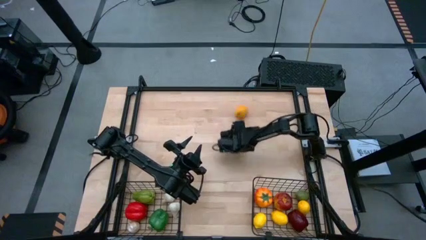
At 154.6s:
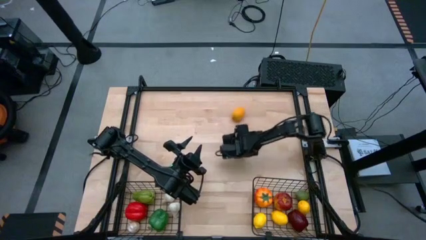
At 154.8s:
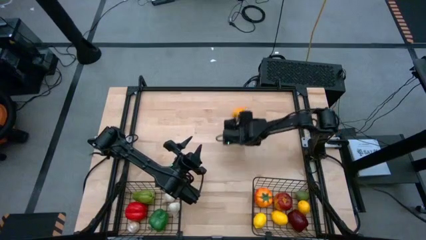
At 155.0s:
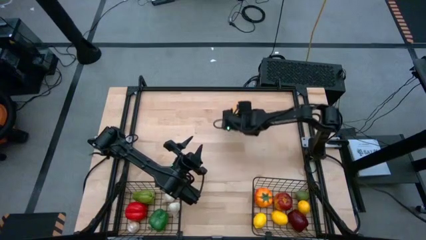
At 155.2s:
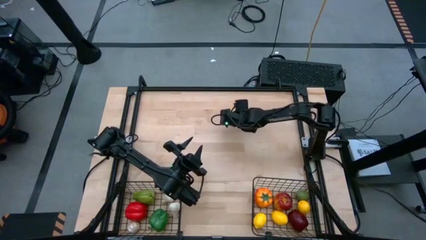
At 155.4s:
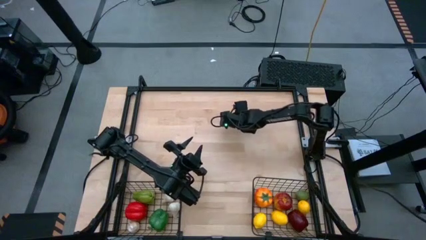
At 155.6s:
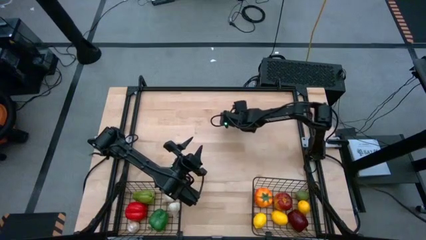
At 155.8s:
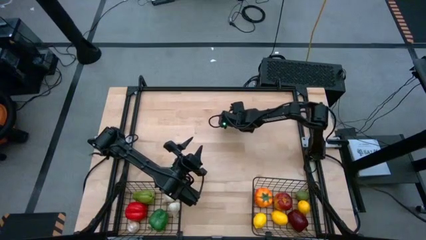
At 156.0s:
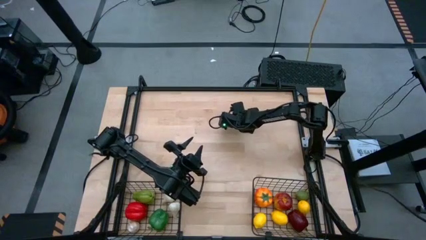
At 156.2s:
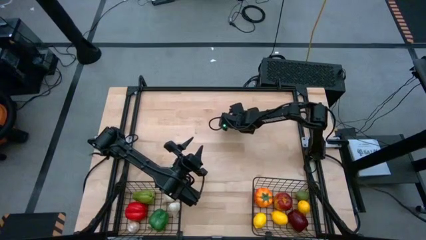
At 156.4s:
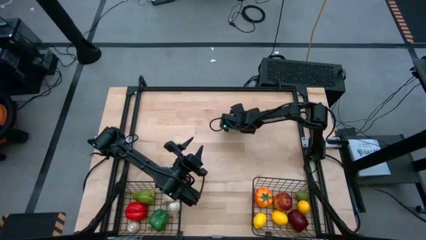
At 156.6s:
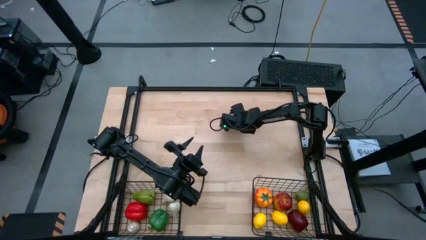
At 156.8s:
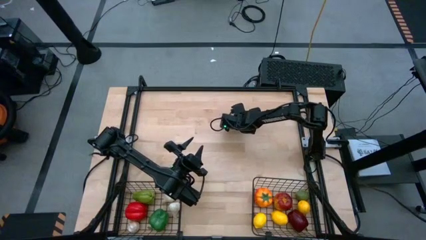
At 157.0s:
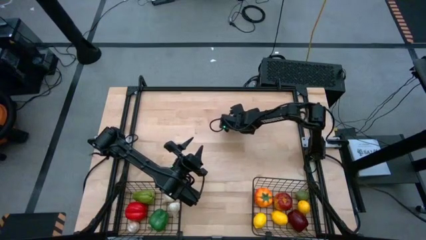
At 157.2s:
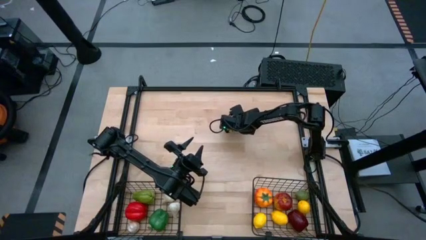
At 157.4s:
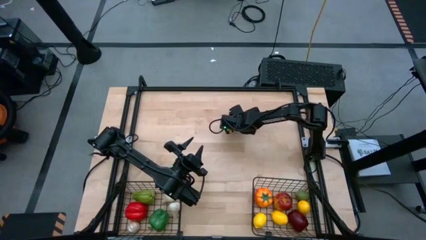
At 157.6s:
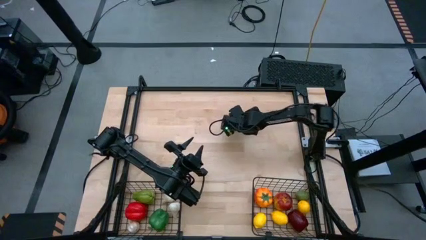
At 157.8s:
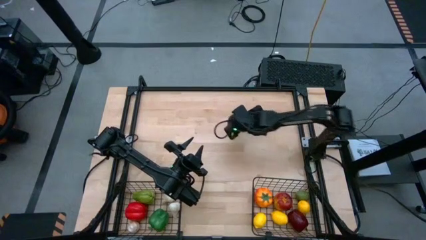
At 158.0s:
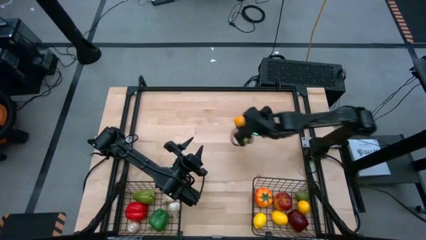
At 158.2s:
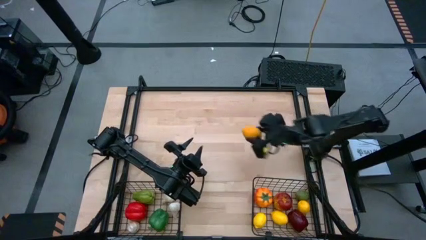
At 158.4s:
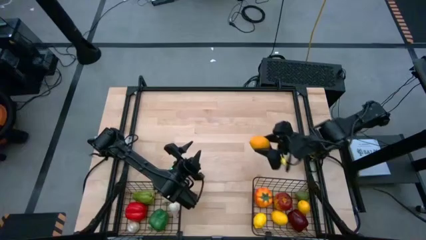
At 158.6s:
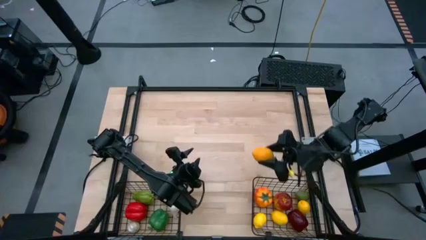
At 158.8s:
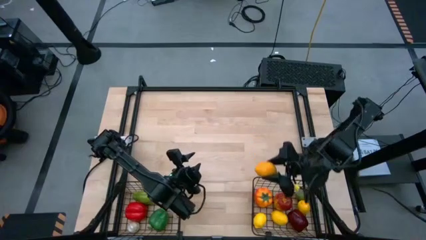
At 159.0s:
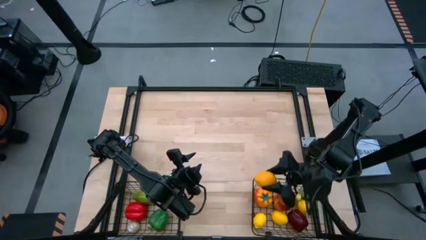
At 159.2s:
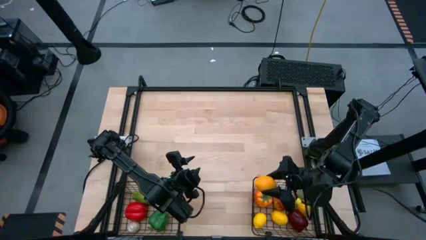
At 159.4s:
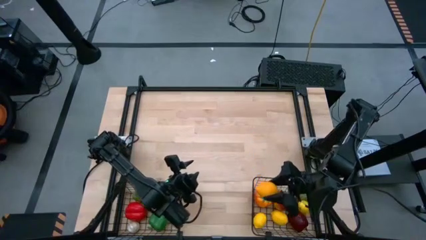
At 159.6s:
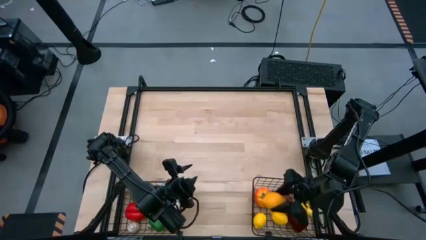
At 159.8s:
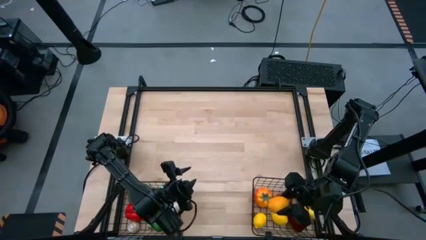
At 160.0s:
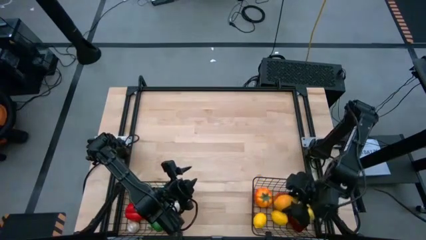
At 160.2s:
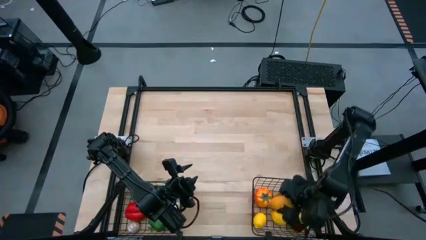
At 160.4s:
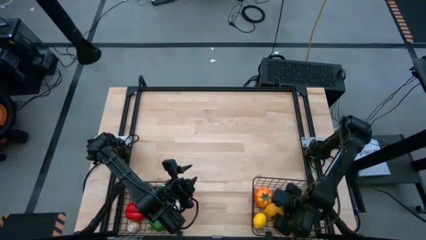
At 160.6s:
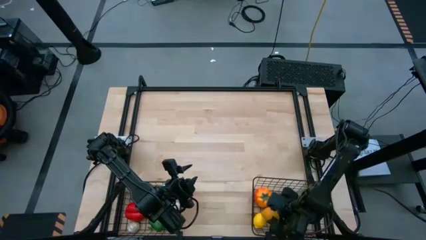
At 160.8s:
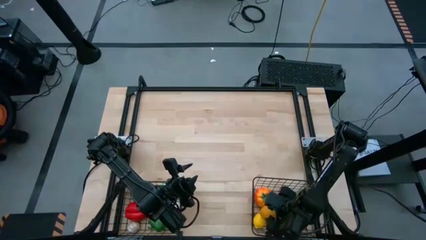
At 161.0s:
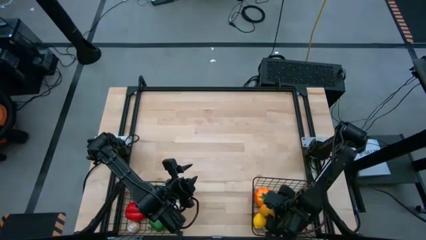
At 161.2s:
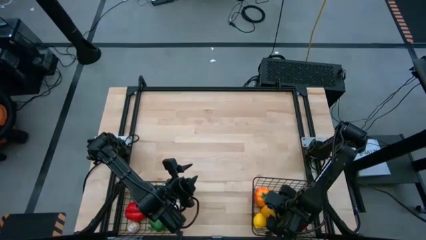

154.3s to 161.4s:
Task: Sort produce into baskets
Put the yellow lemon into the right black basket
